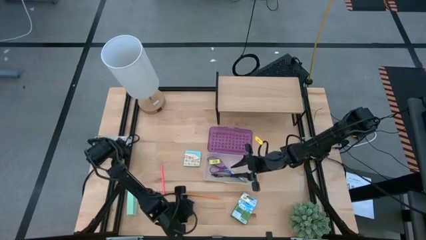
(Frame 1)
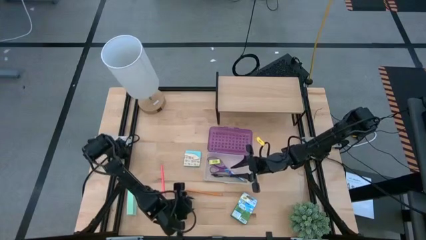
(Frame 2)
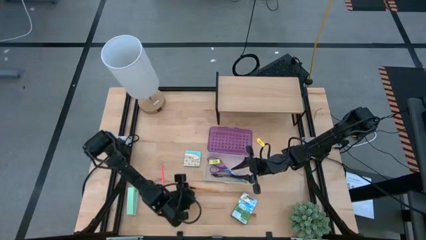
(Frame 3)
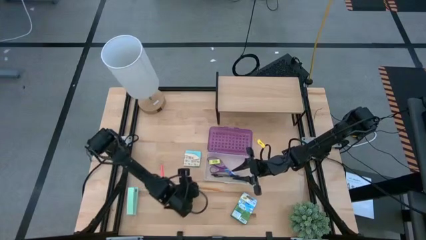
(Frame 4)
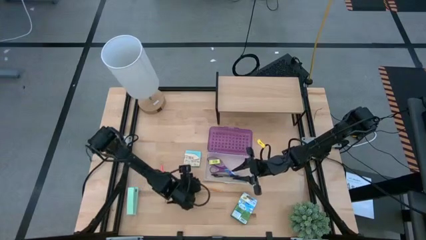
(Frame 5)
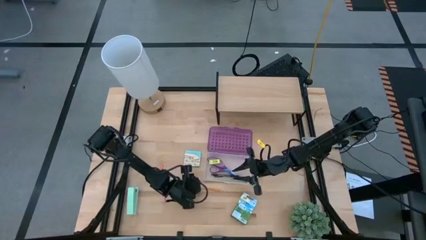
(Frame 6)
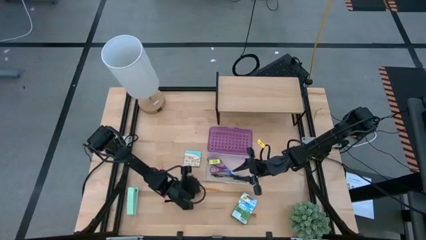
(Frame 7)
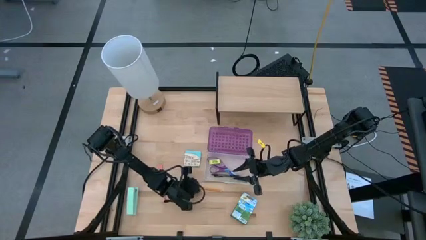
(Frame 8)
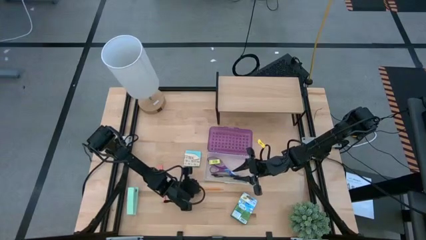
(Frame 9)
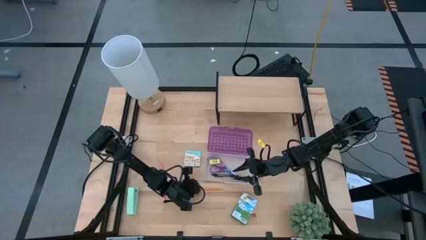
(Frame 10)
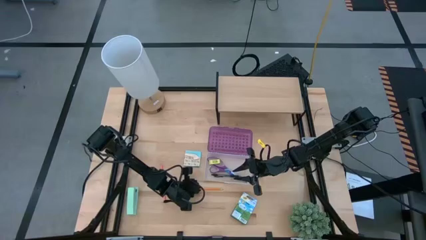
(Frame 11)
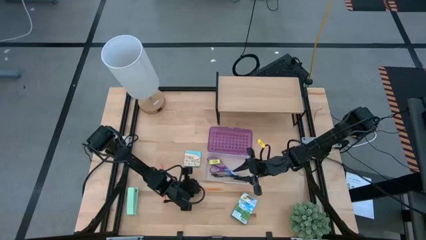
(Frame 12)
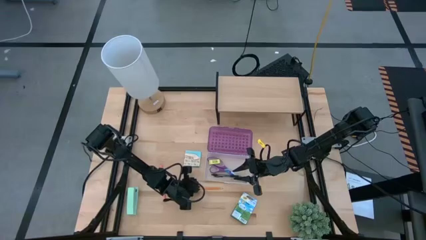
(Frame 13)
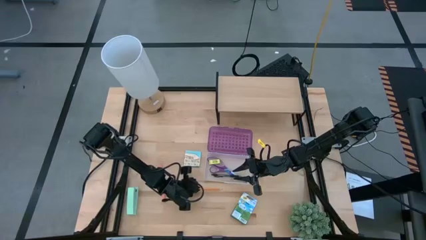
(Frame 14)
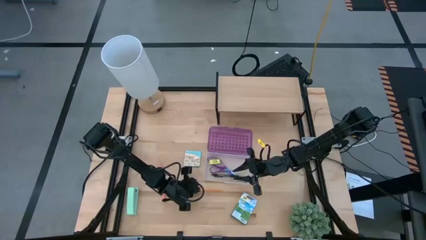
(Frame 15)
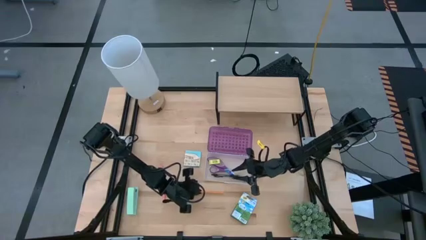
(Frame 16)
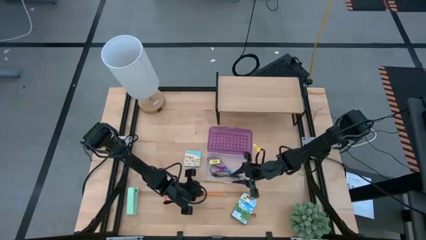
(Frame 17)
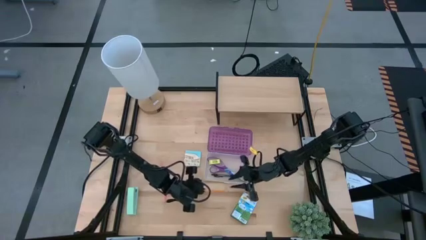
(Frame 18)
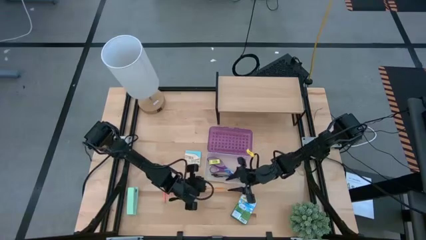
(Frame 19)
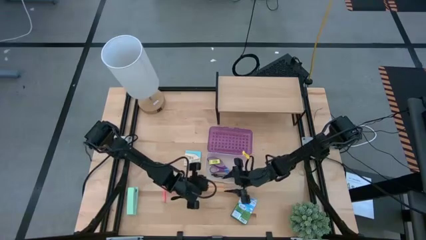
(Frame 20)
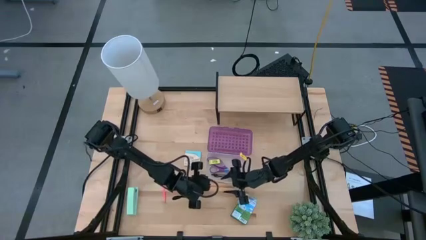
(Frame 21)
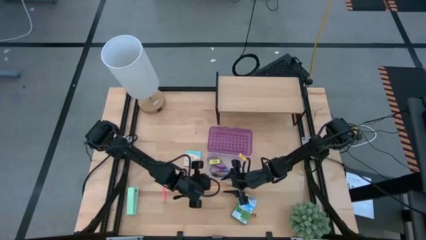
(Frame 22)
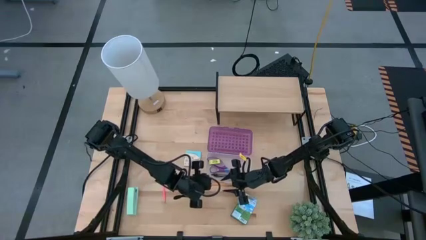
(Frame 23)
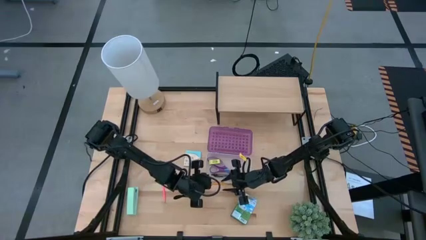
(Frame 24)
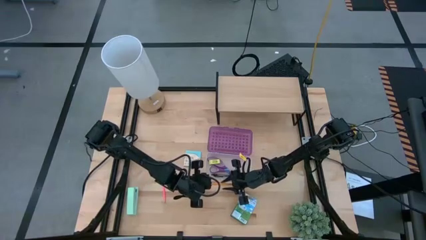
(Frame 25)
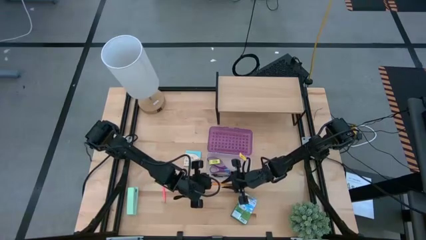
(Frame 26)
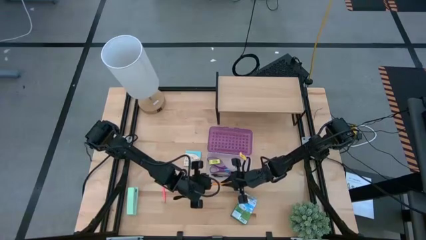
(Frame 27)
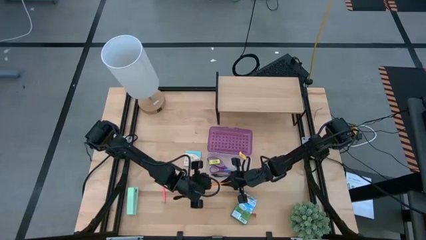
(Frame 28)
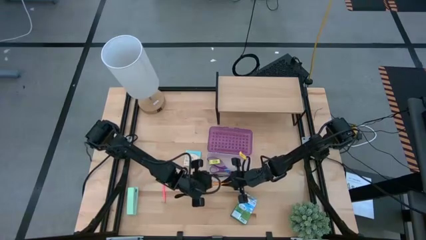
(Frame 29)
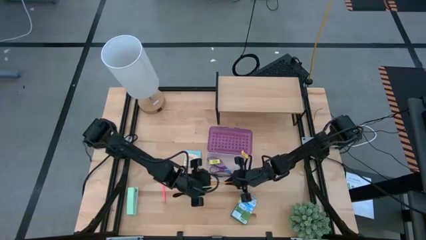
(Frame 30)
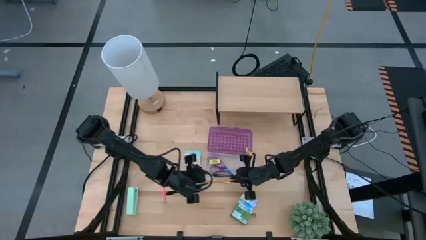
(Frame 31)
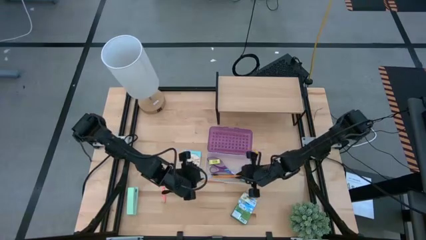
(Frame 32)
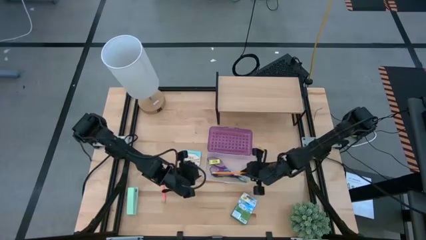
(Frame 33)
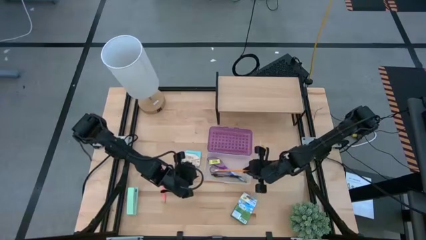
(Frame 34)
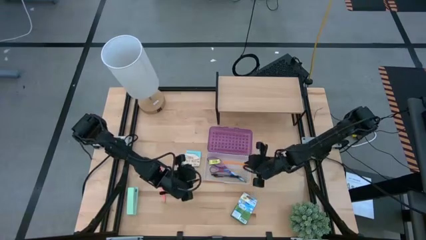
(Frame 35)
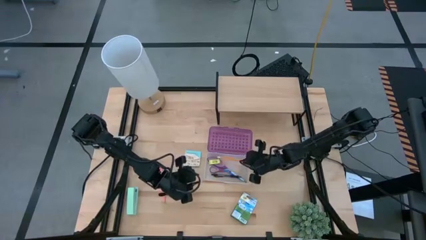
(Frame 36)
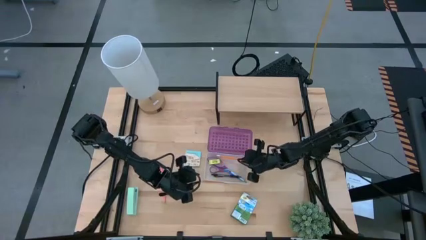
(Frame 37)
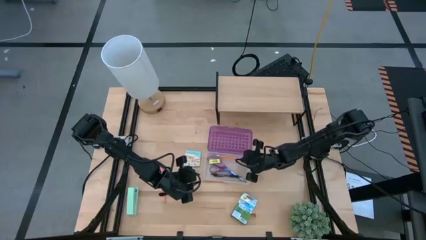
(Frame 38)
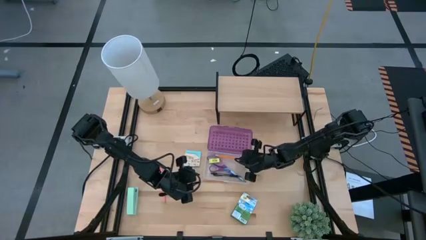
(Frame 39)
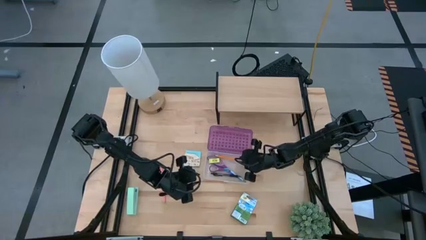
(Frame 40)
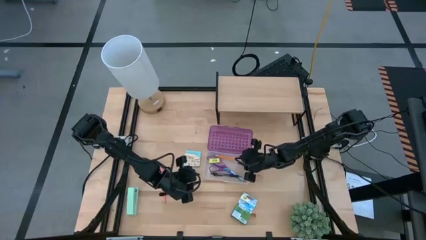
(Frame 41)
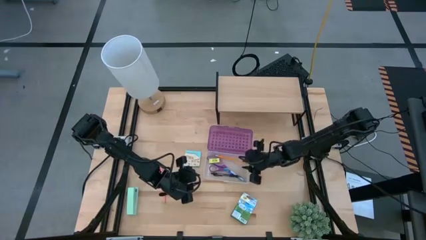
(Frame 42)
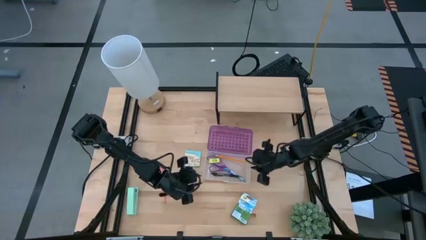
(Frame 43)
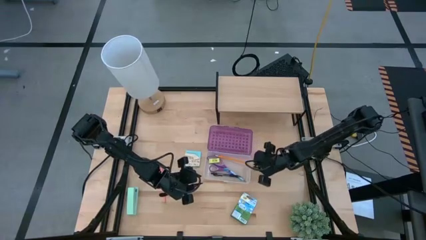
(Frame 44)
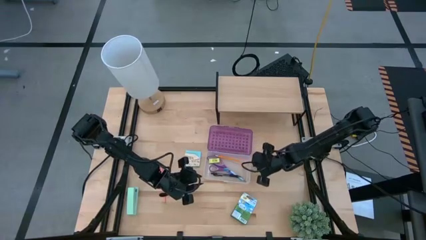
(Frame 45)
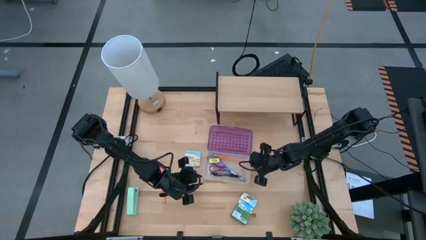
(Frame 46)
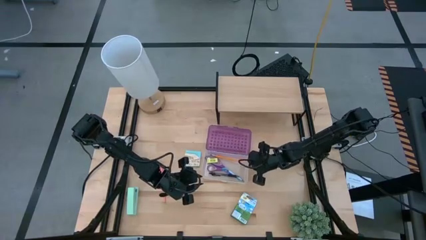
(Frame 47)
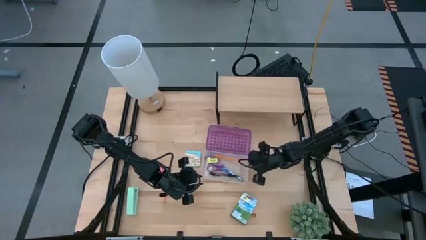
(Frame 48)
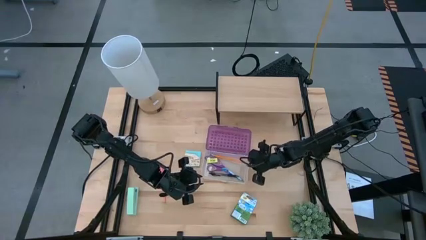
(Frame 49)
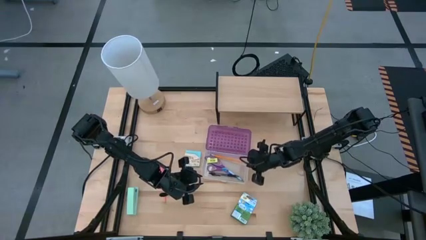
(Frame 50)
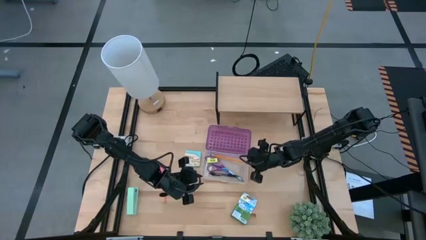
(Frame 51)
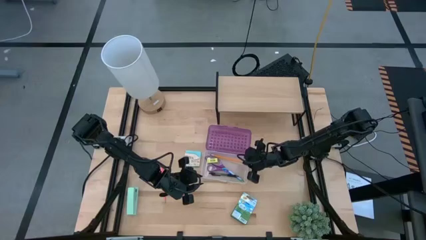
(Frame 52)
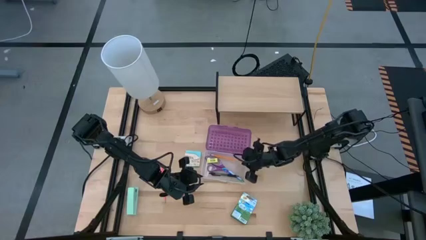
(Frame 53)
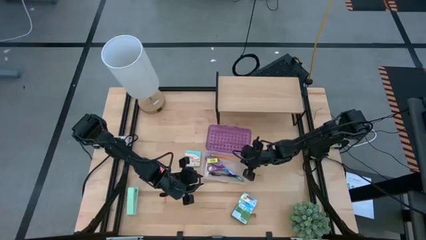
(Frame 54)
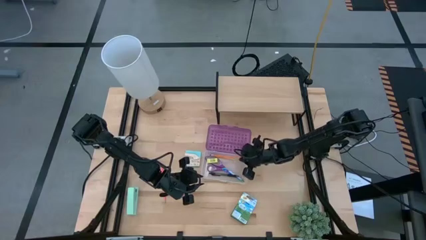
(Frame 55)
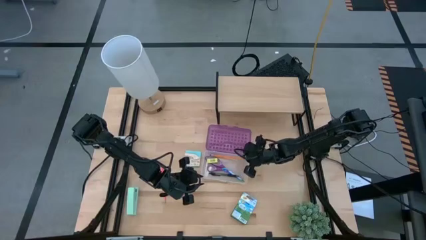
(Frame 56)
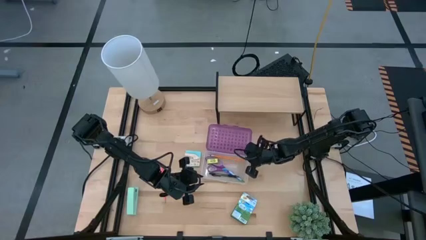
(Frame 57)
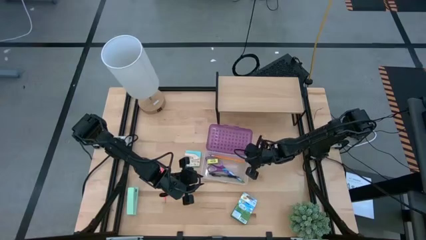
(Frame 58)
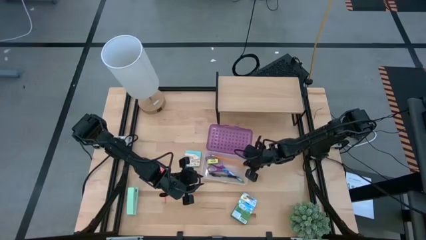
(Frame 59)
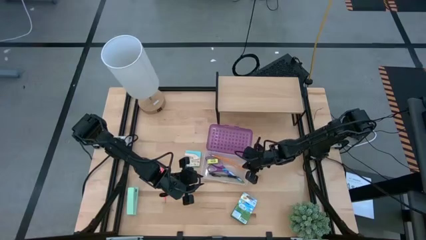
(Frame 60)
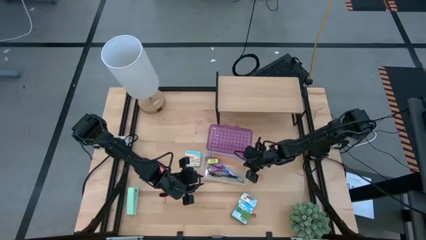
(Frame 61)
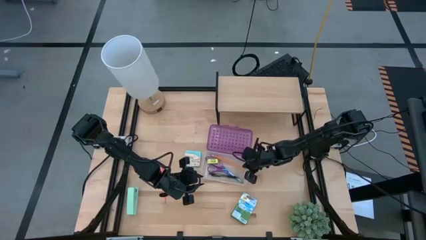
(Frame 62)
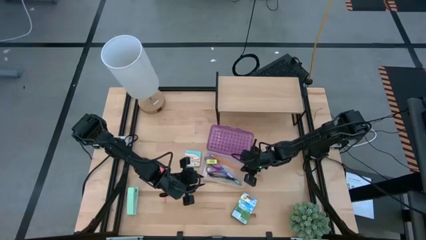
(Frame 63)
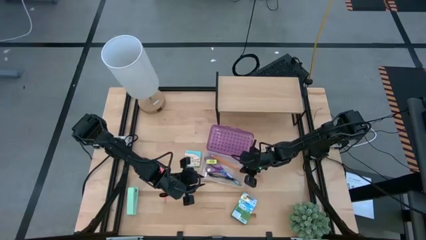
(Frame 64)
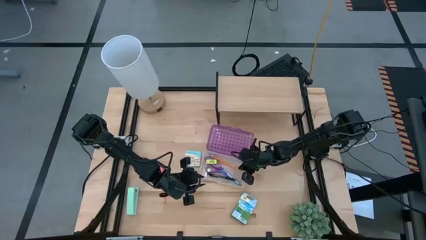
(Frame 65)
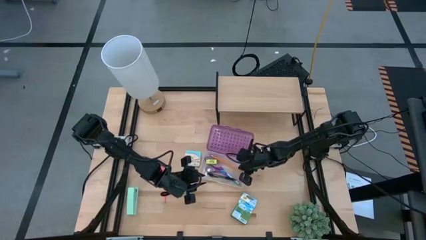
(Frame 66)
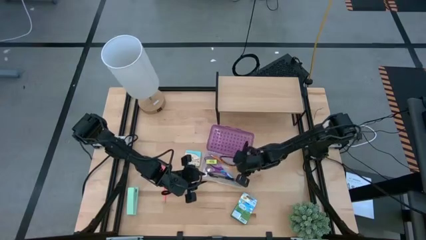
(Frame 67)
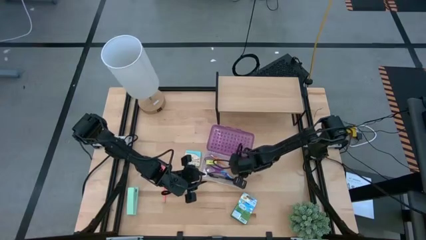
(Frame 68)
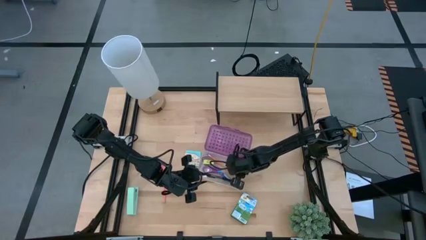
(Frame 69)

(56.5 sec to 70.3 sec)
Task: Pack school essentials
Put the orange pencil into the purple supply box

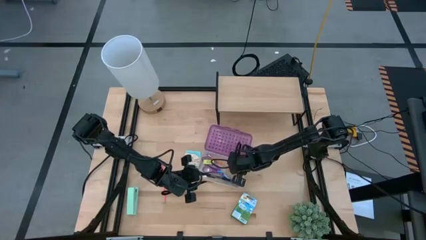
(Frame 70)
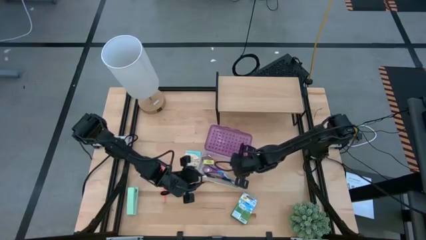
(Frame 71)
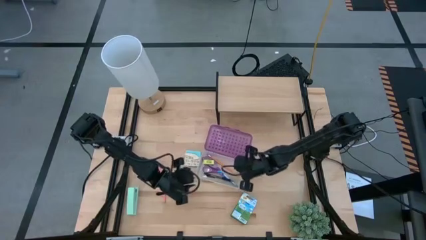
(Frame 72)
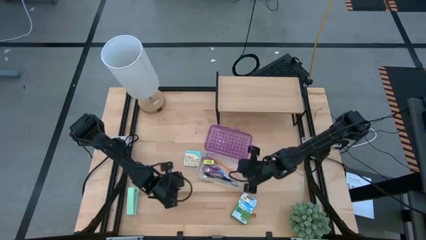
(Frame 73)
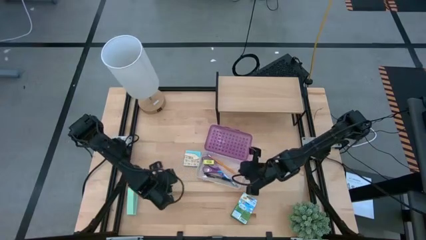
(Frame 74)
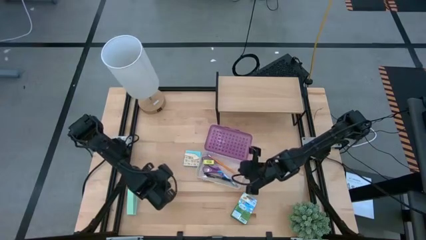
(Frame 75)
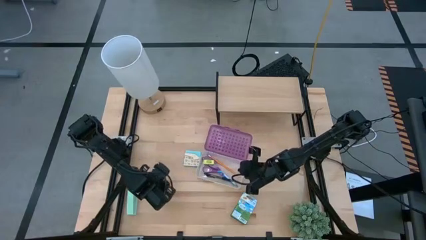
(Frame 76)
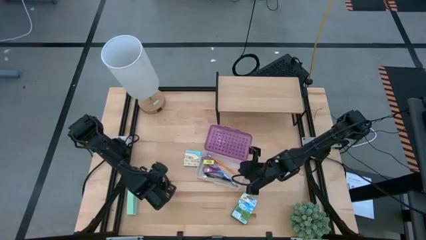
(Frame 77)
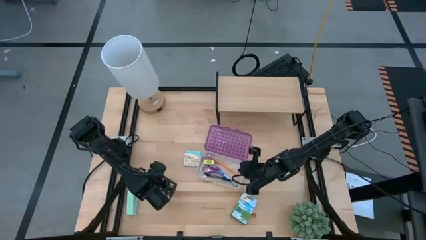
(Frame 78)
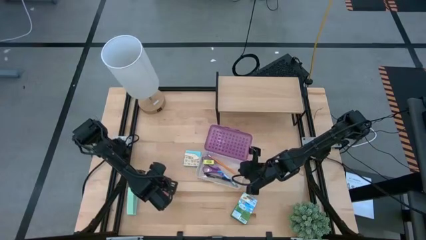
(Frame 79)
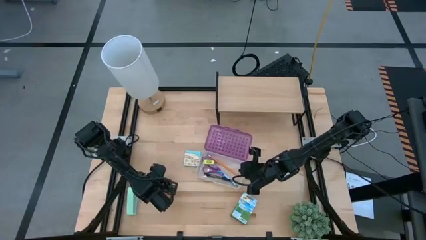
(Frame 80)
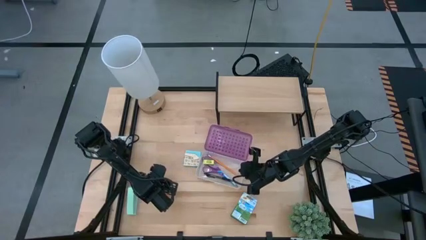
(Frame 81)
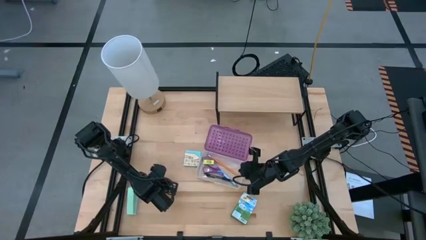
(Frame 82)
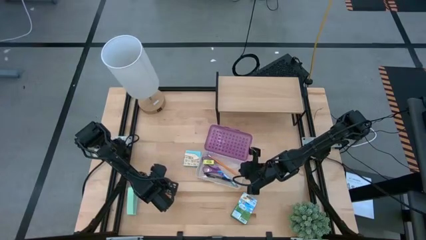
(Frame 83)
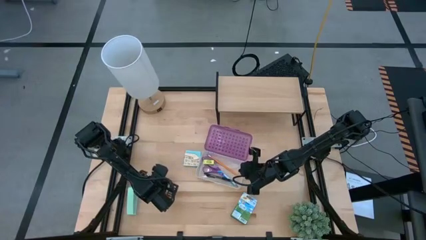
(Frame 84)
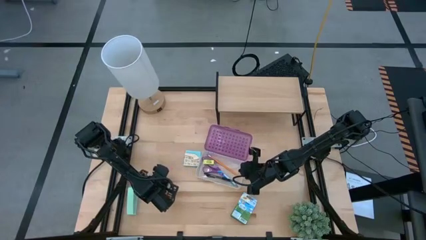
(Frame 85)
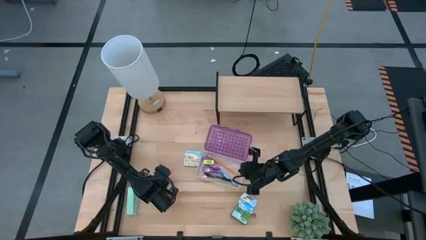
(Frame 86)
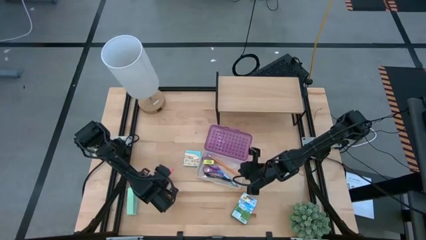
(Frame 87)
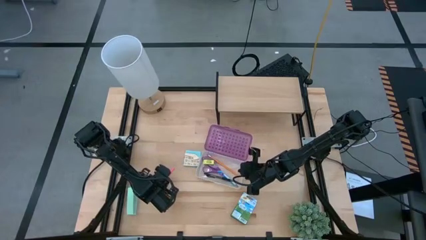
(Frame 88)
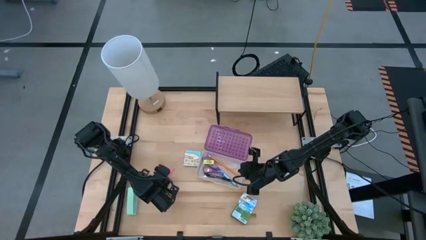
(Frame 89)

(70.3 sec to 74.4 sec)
Put the pink pencil into the purple supply box
